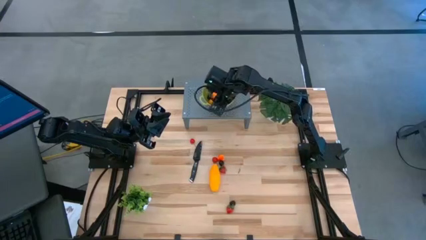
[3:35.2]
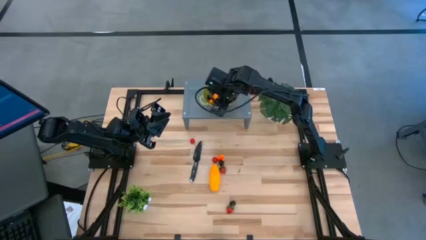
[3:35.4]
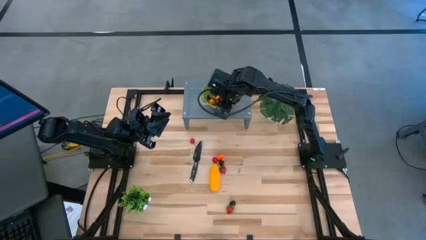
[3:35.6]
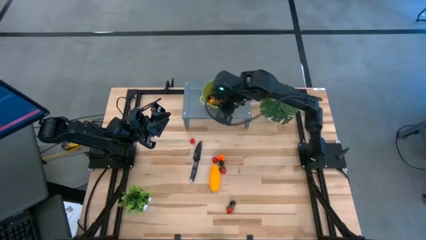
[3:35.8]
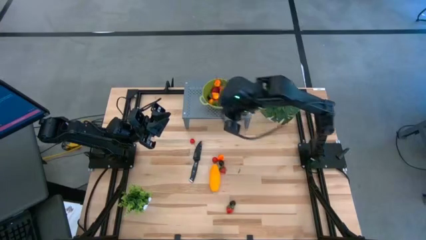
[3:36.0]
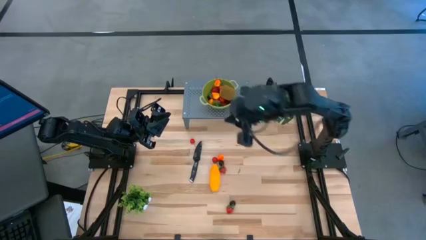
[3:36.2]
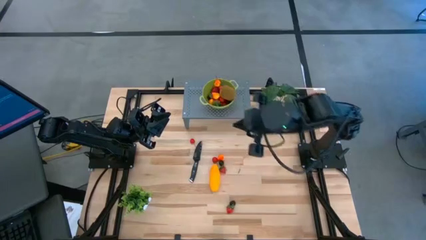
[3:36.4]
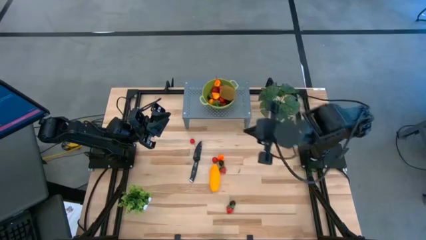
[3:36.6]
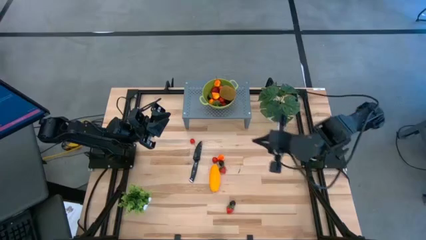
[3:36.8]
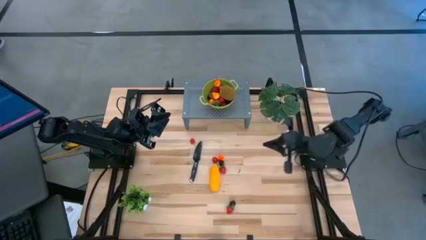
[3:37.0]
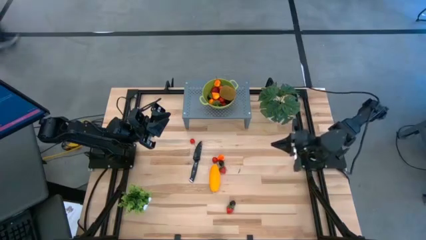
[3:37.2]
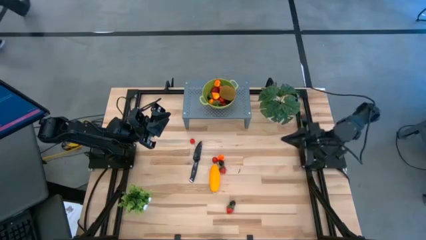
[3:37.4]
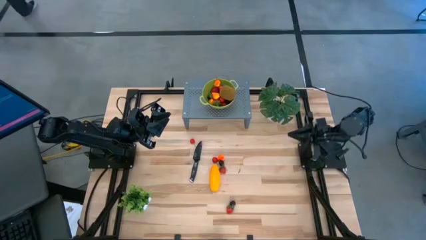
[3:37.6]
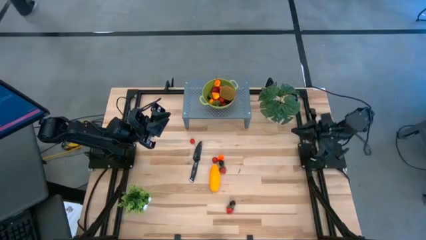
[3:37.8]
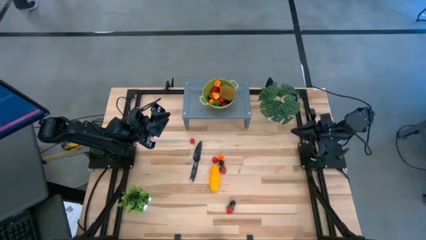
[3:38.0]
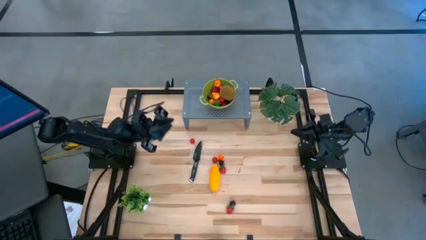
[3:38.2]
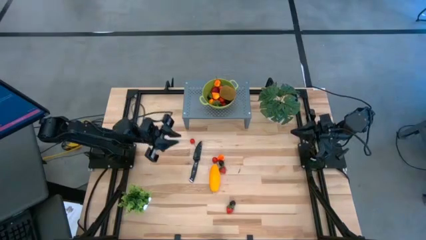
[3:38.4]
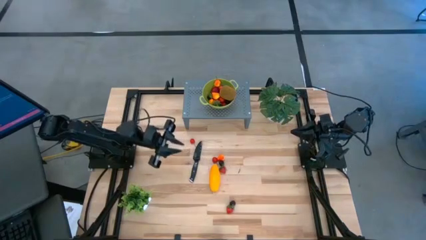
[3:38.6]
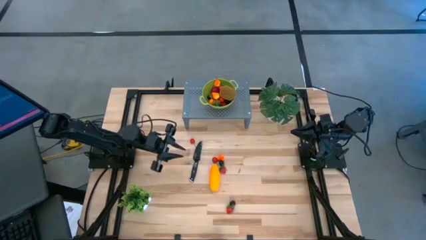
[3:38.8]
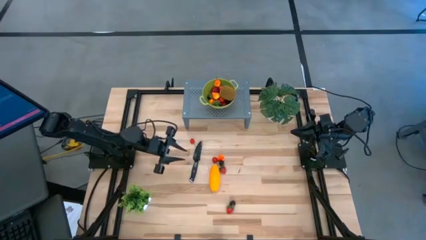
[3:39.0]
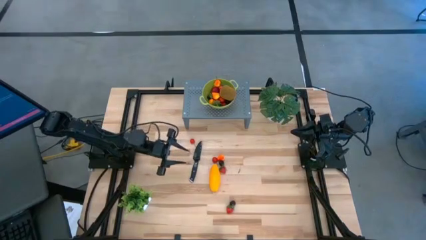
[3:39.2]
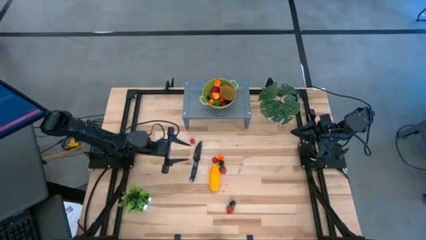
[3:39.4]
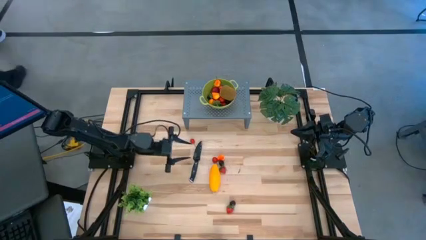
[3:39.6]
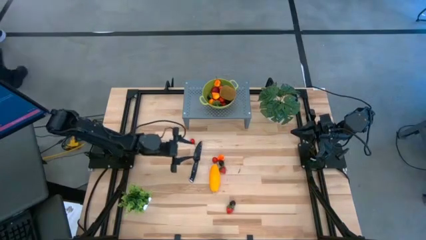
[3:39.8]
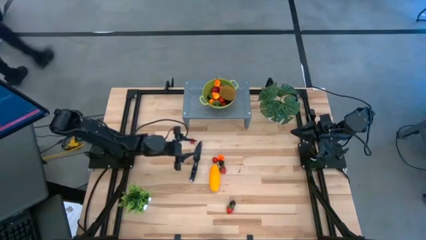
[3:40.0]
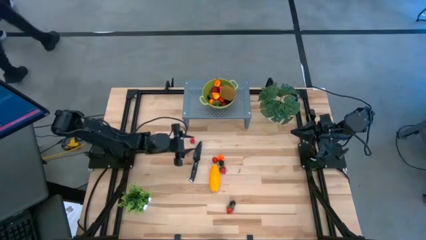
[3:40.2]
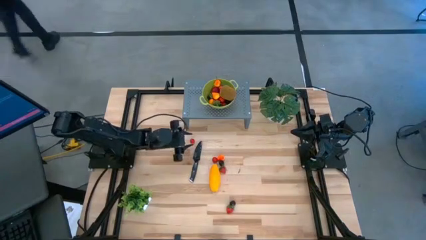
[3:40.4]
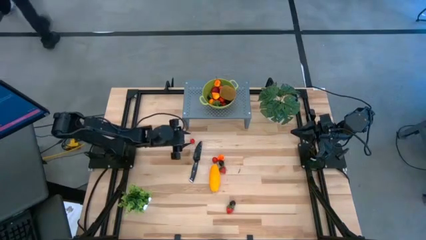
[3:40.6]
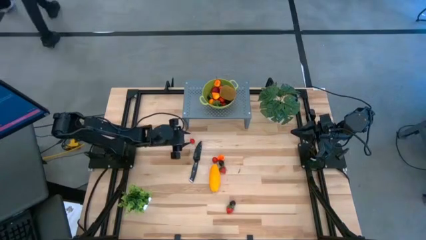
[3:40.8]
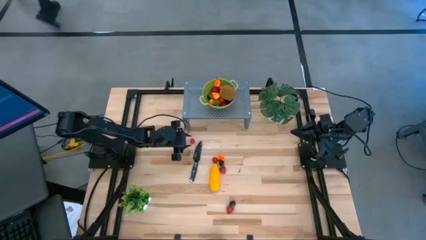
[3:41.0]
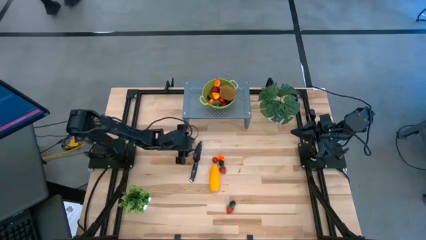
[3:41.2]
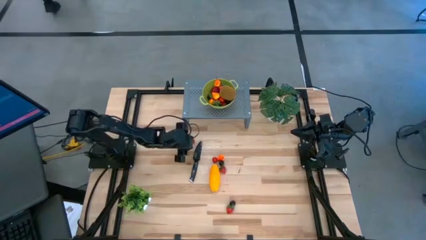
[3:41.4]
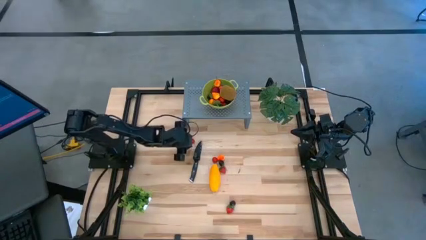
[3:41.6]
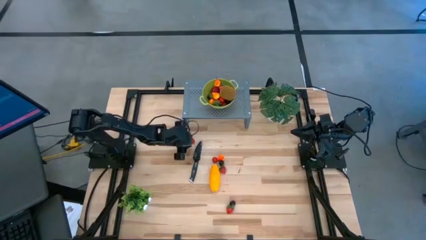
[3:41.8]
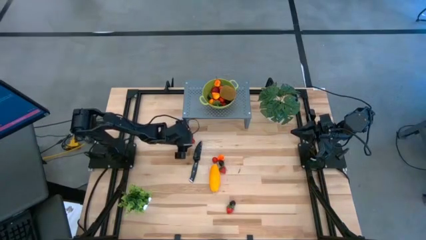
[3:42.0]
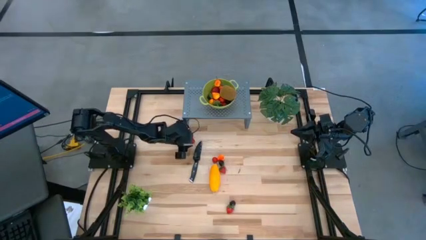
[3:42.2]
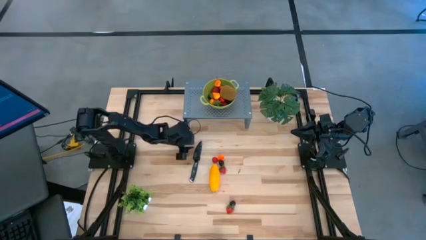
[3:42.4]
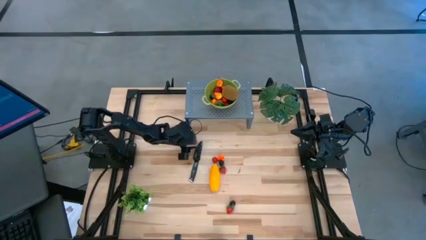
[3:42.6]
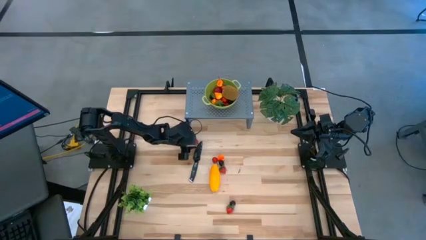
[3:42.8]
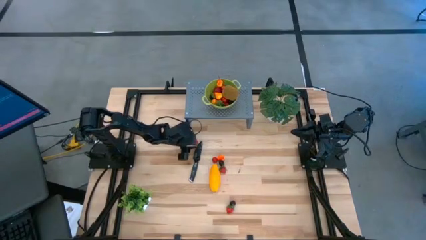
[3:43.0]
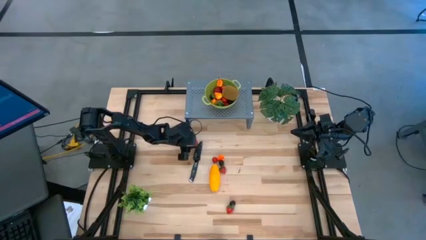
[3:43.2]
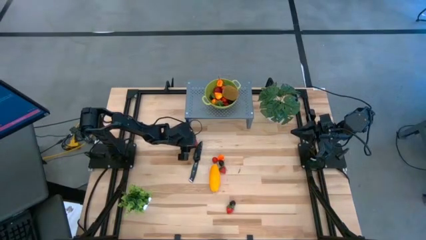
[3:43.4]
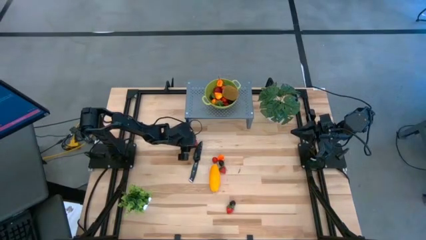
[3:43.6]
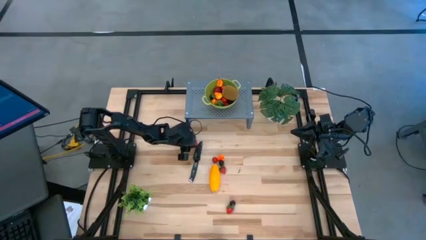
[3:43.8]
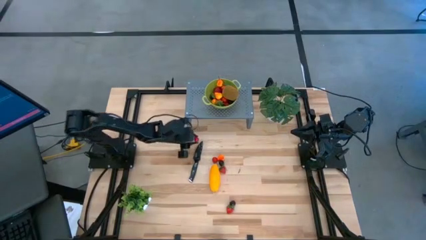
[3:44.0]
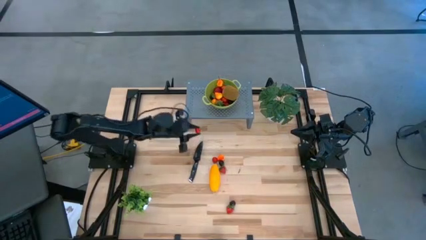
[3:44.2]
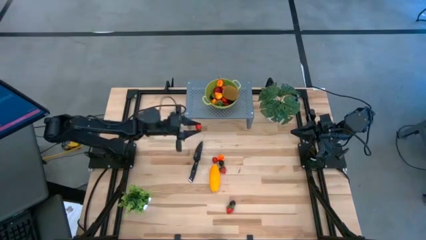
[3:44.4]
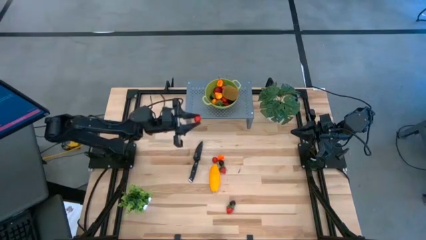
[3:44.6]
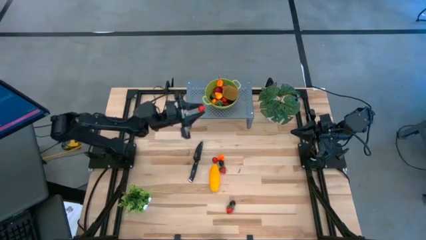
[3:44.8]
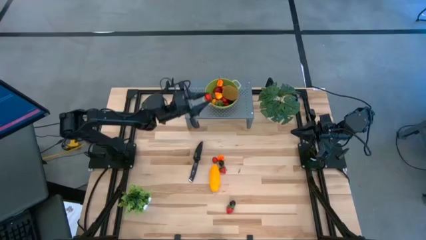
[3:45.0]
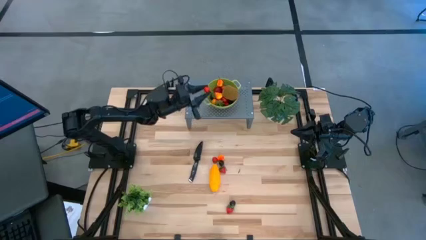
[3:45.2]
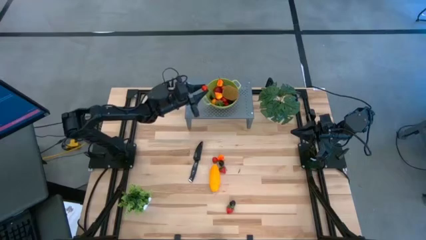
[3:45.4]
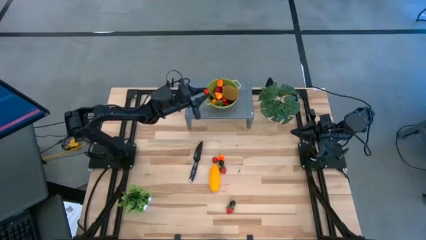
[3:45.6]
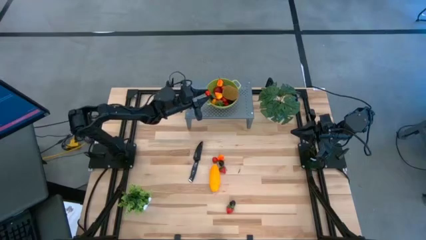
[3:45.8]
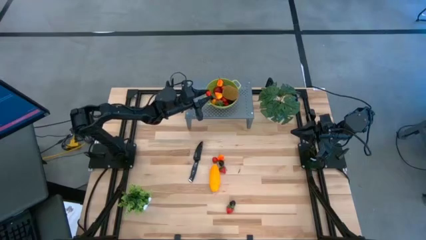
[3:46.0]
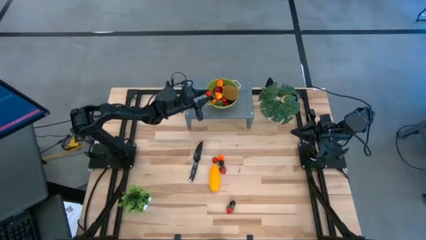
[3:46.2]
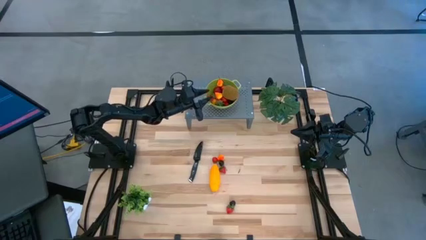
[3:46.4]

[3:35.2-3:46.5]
Task: Pick & Place Fruit
Put the red cherry into the green strainer bowl on the shelf

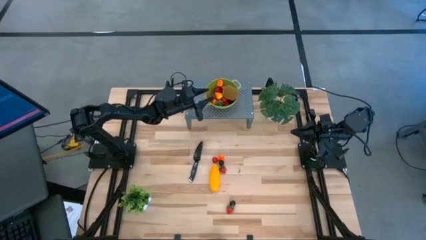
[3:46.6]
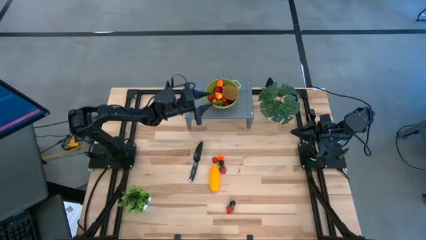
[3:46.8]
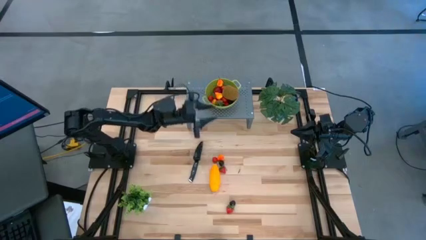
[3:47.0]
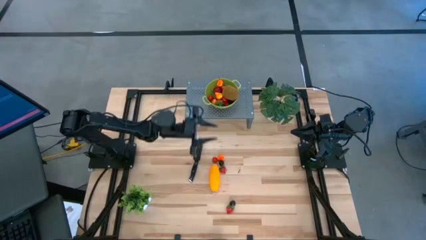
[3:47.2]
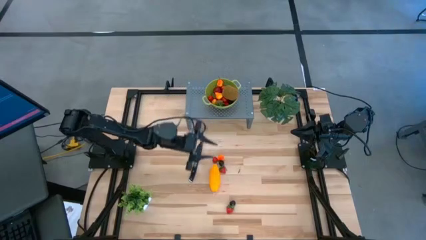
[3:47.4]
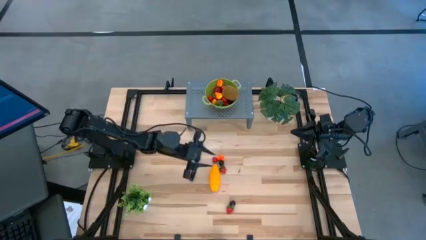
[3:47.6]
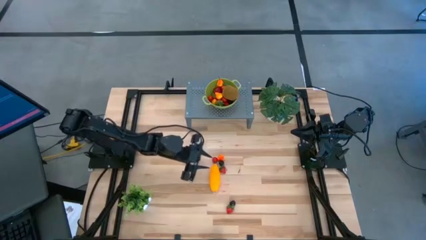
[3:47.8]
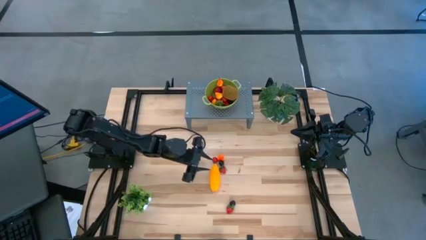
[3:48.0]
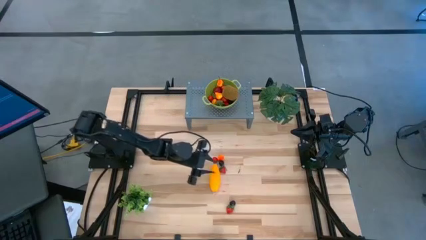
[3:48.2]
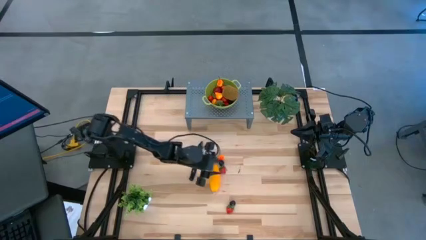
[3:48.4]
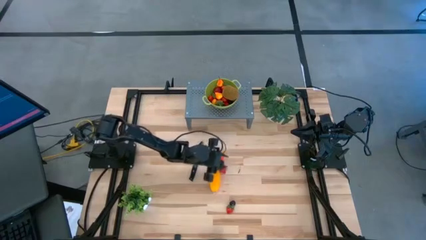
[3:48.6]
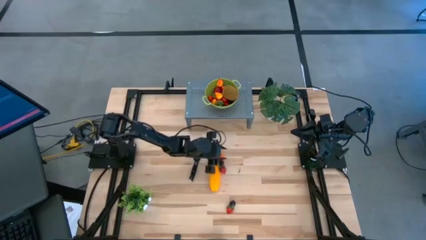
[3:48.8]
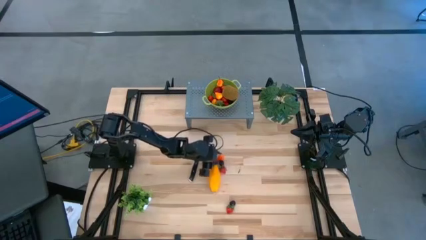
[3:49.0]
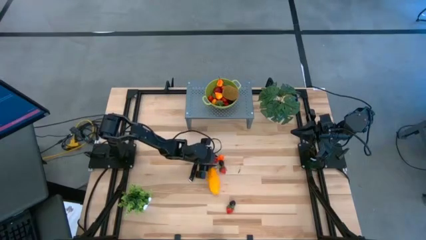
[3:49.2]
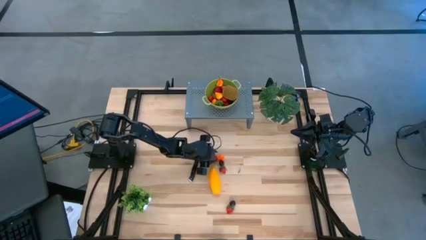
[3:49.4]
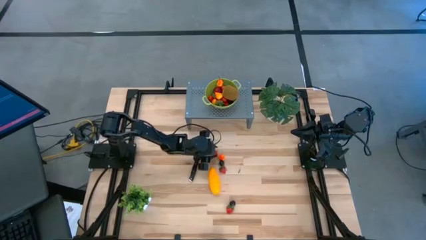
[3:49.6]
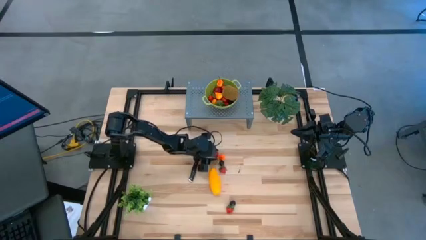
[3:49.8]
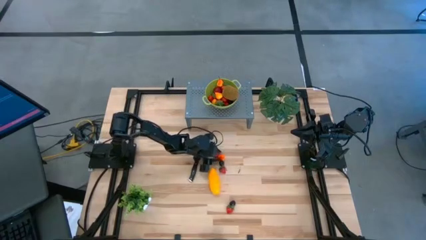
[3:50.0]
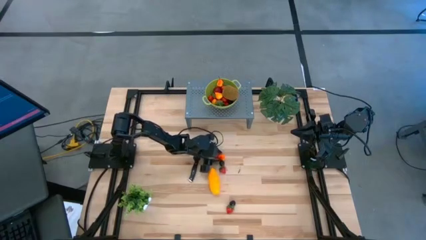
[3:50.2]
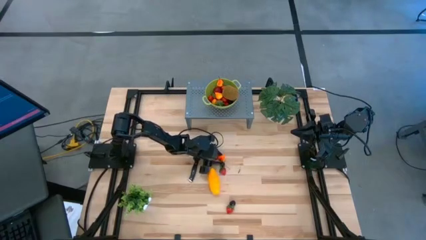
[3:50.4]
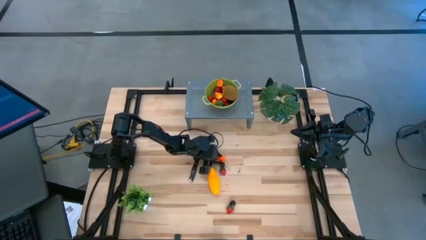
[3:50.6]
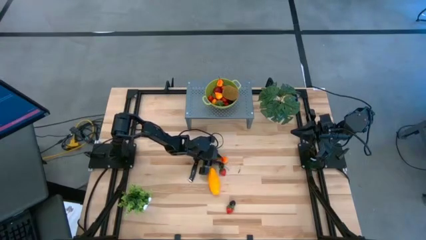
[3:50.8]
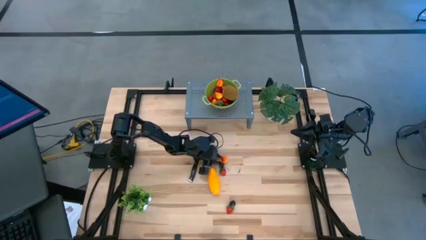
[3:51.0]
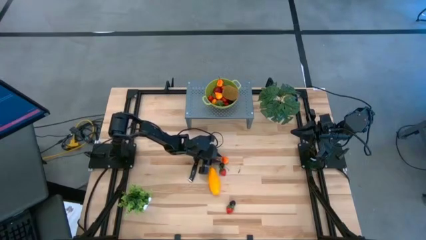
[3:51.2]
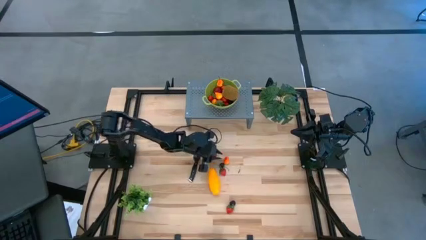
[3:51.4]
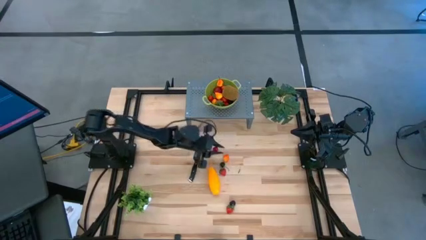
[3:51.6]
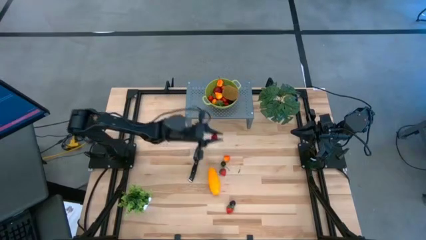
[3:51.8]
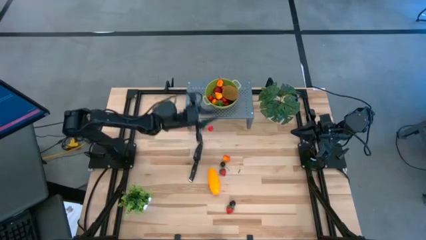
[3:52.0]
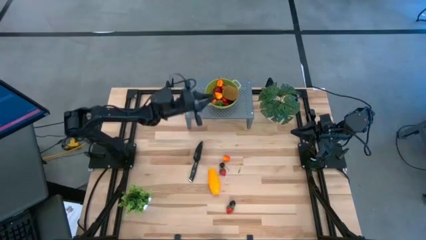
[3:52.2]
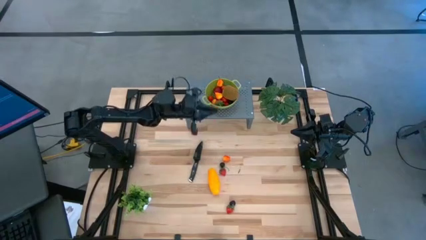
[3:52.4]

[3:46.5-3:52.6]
Put the red cherry into the green strainer bowl on the shelf
